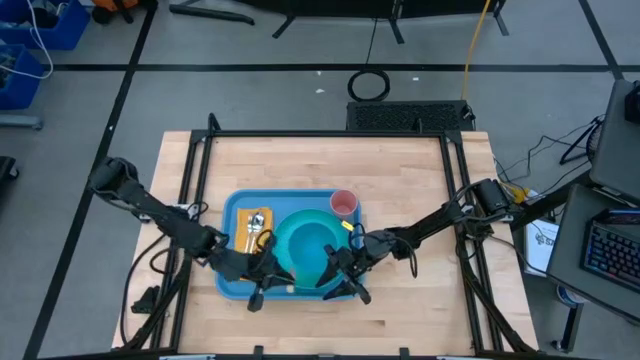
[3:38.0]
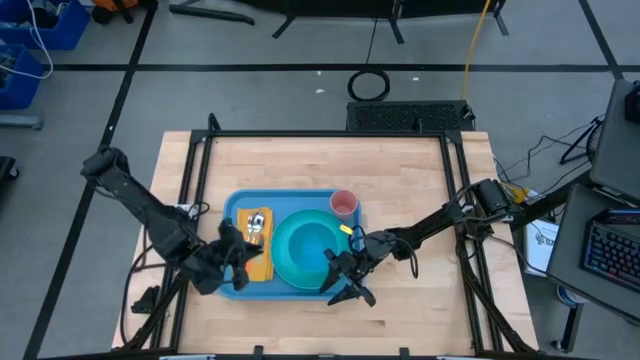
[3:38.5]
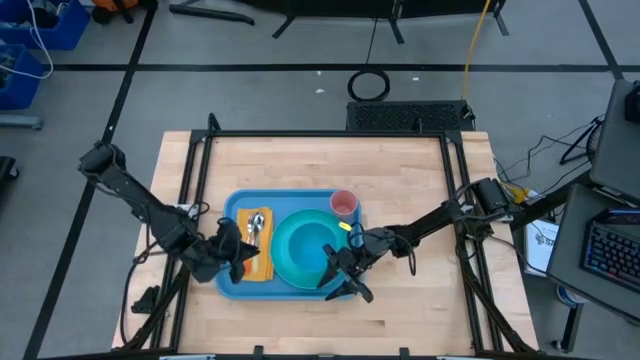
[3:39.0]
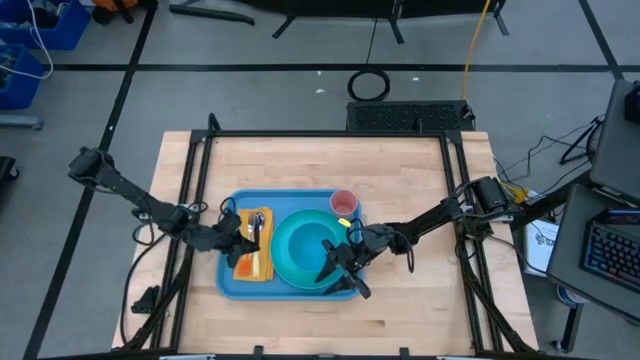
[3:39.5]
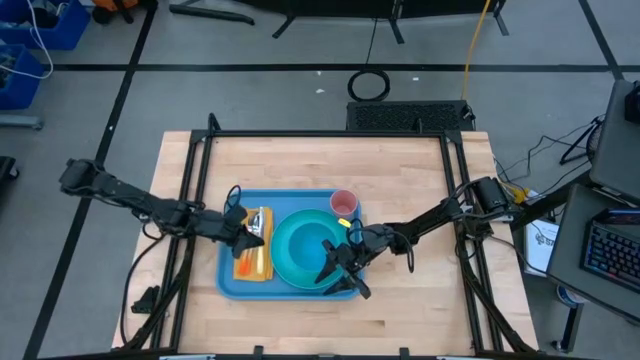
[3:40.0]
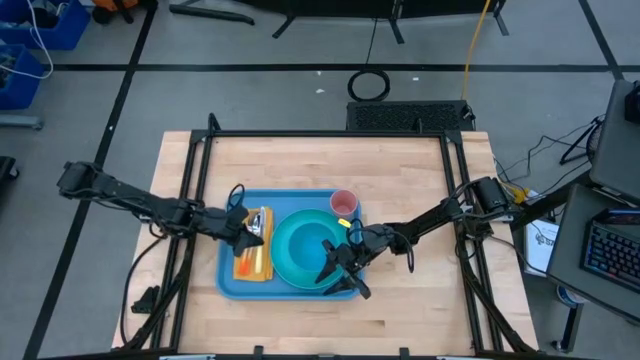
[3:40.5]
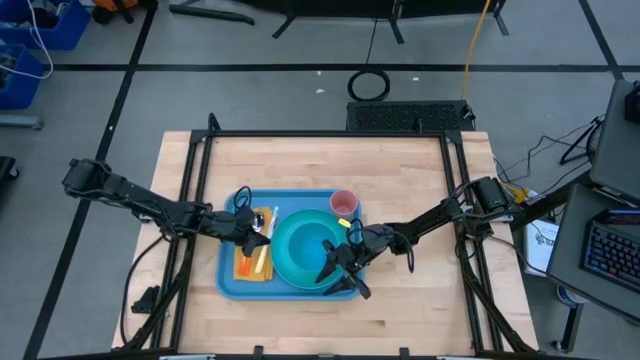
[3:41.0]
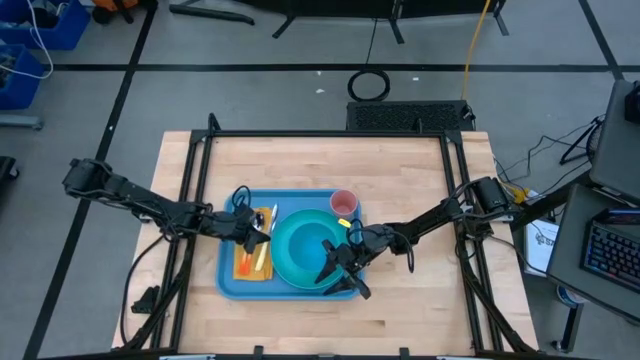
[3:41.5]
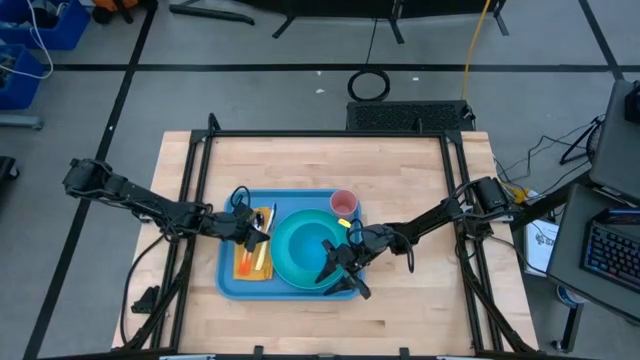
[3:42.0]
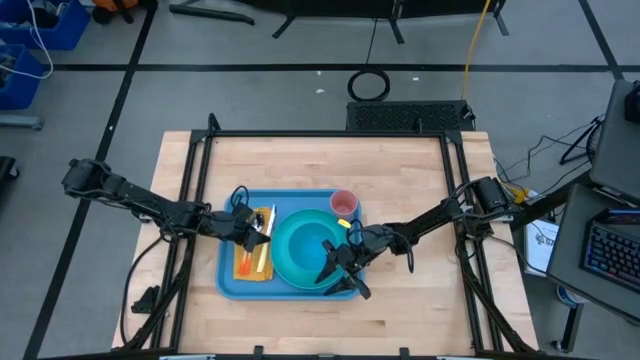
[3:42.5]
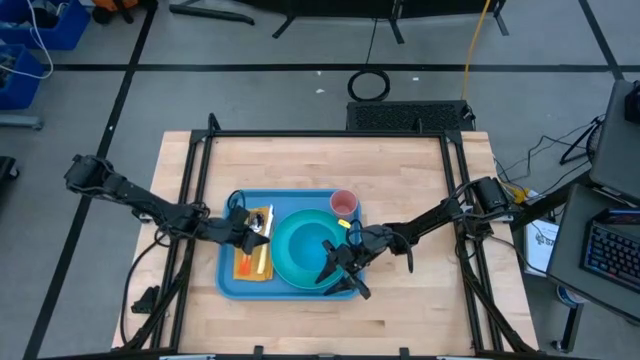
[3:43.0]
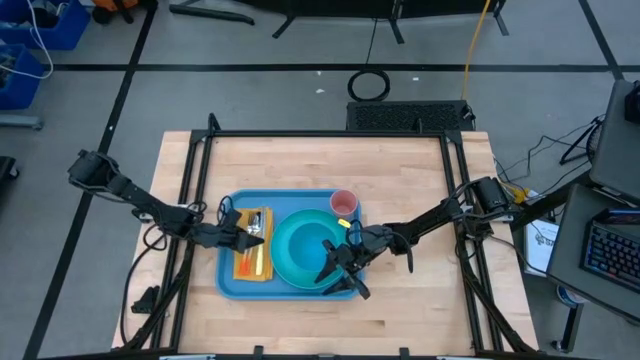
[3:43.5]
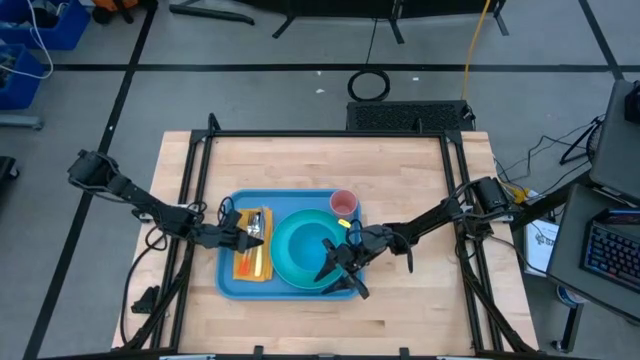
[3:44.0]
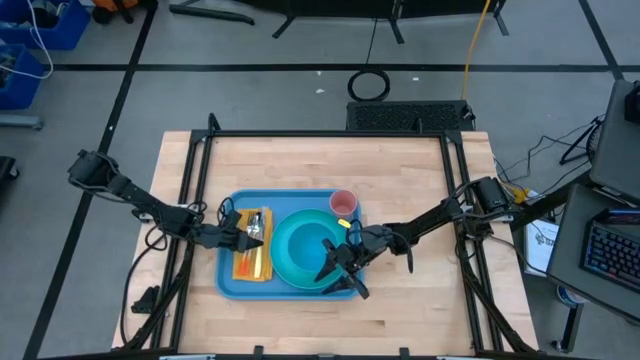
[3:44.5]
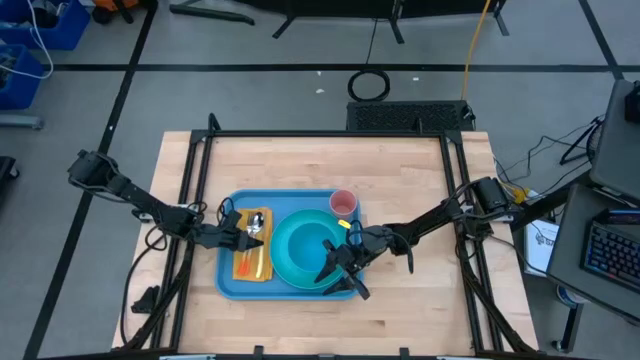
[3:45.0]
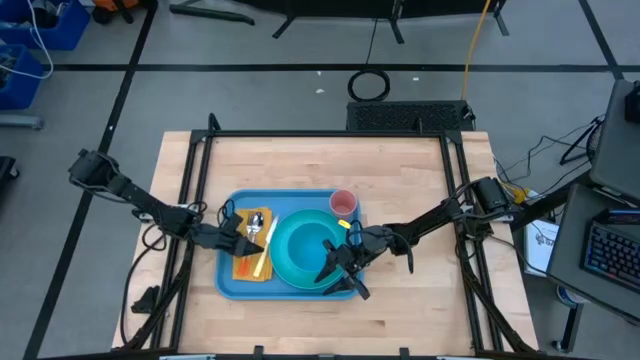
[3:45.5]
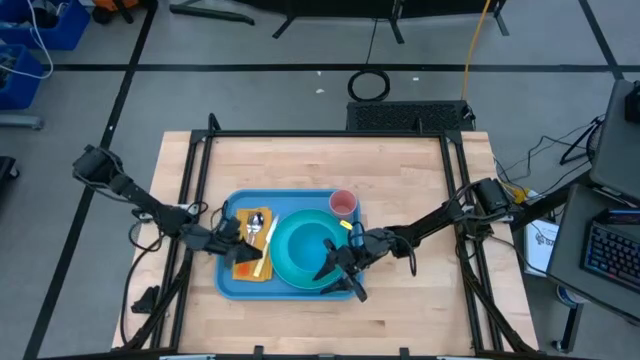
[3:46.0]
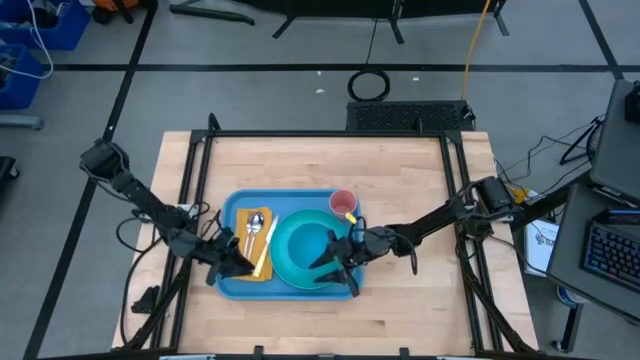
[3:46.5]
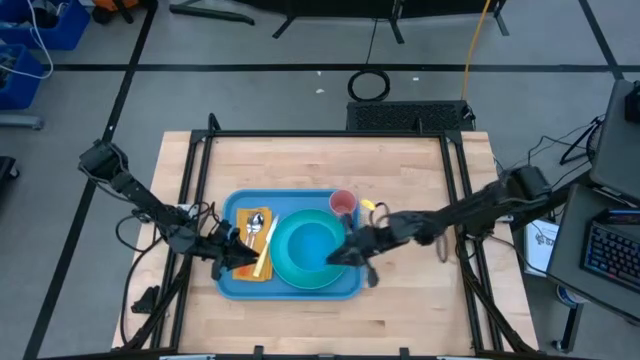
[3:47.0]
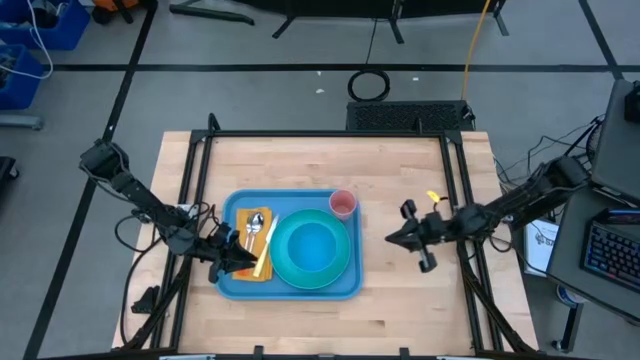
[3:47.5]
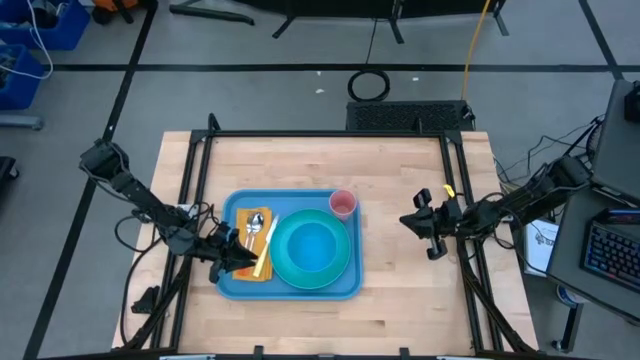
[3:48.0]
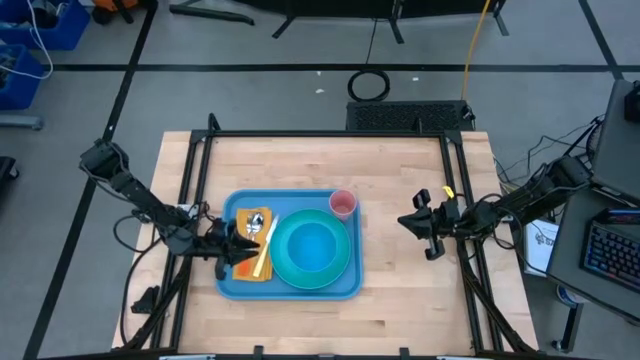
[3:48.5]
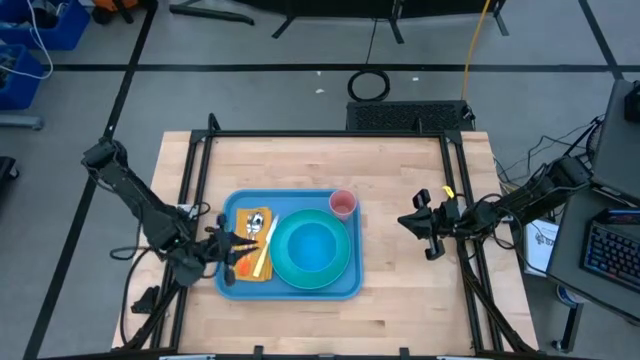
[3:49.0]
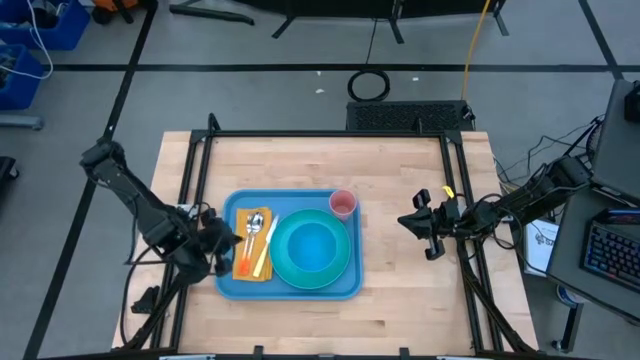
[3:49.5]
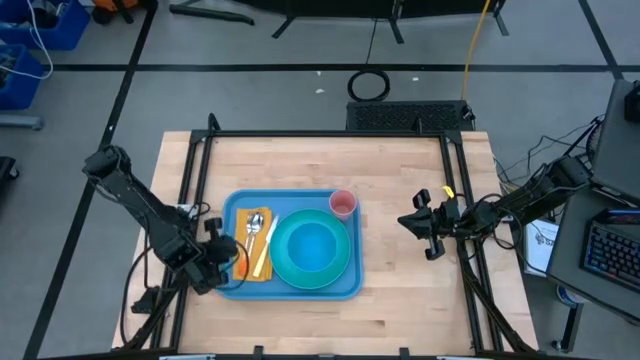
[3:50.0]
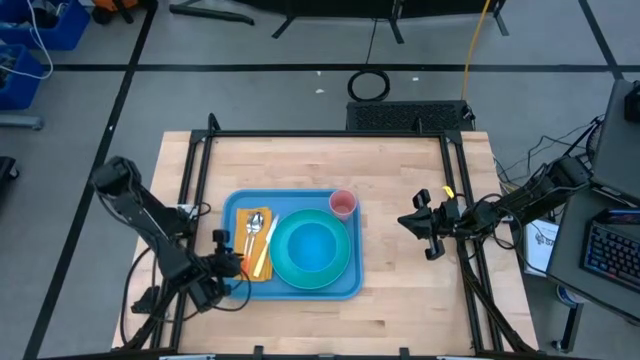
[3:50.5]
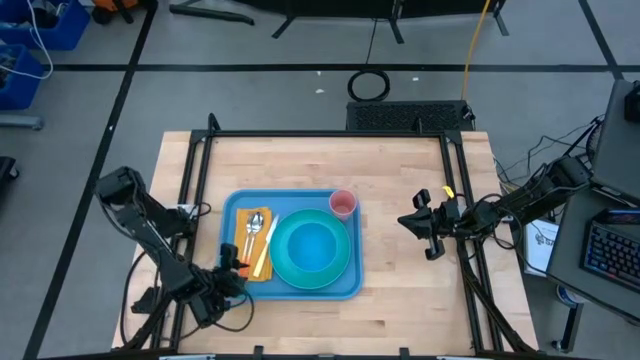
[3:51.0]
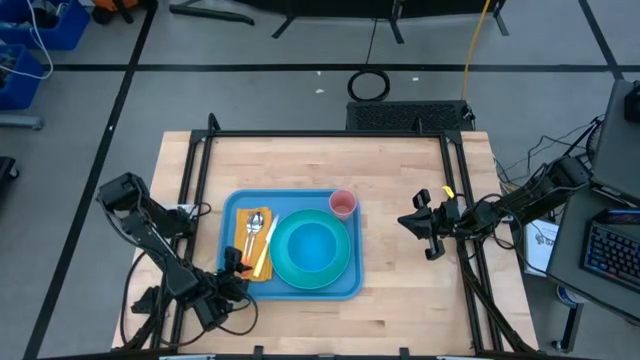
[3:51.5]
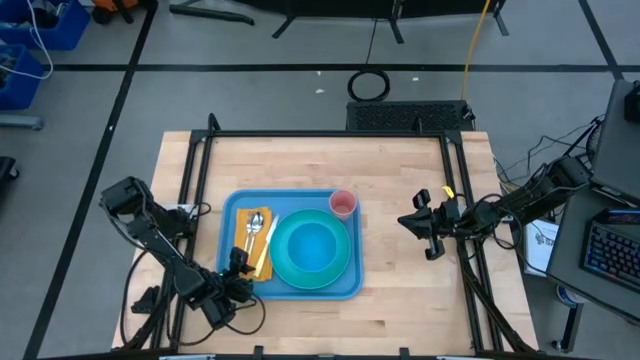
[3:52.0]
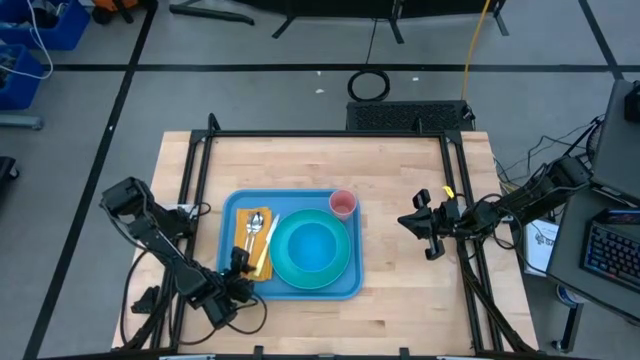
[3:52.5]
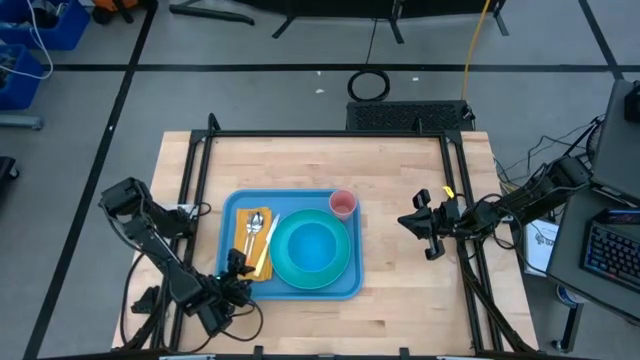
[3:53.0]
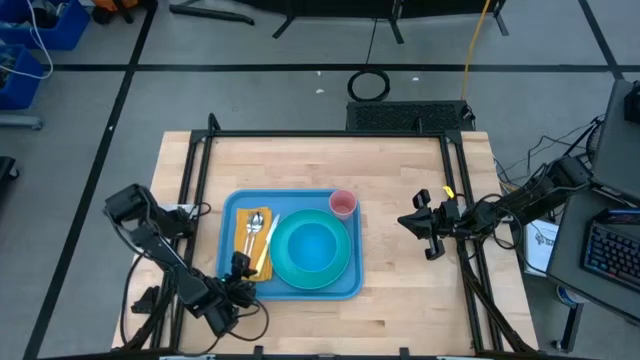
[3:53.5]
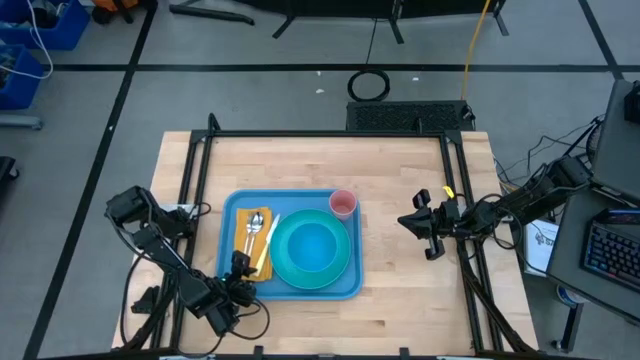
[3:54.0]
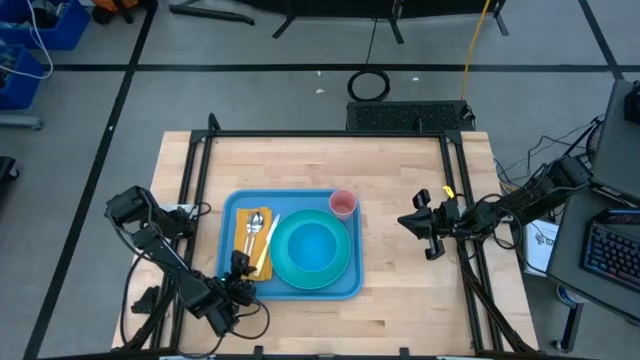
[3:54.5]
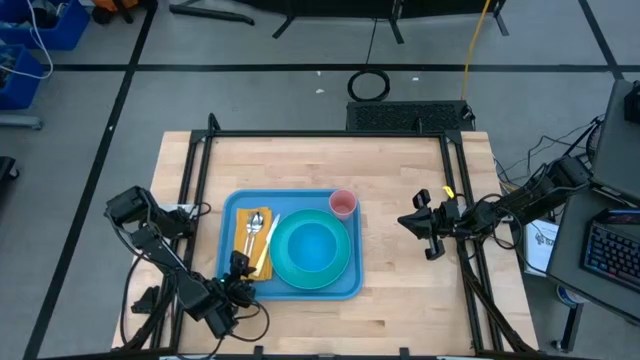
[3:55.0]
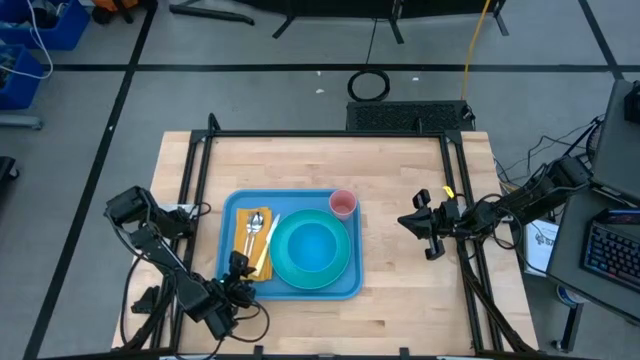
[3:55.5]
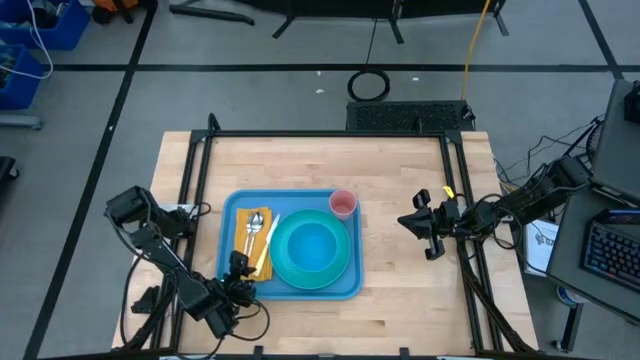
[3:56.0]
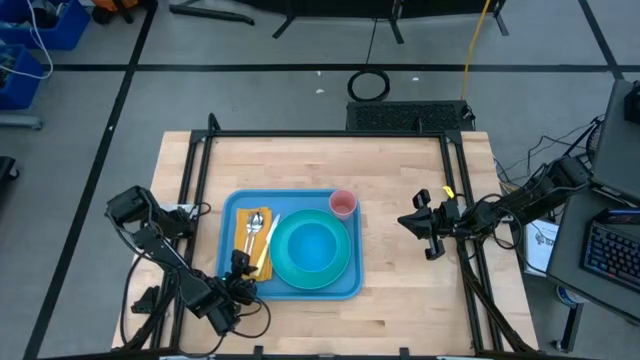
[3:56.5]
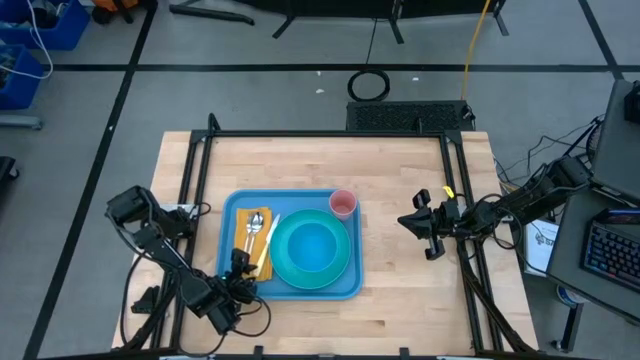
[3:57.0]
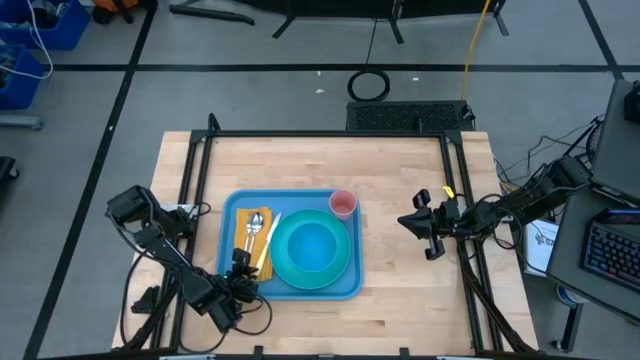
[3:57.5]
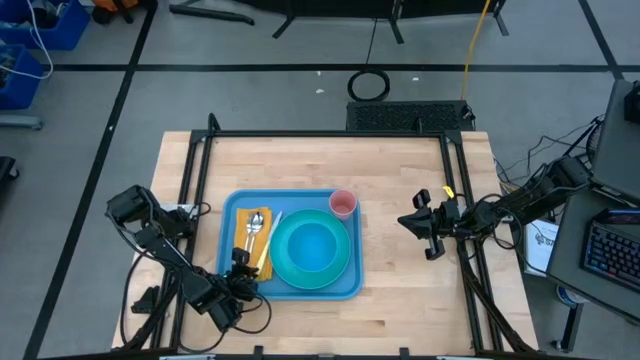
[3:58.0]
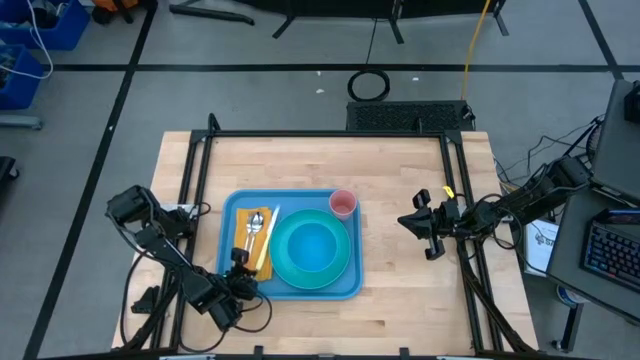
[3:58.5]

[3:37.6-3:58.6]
Task: Set up tray
Put the yellow knife on the blue serving tray to the left of the orange spoon
